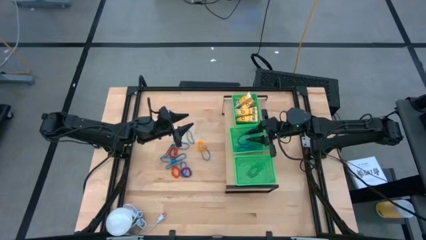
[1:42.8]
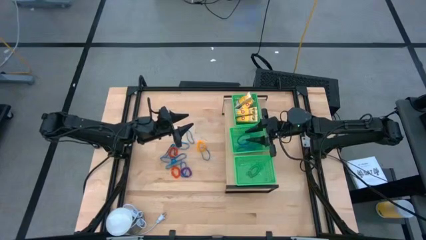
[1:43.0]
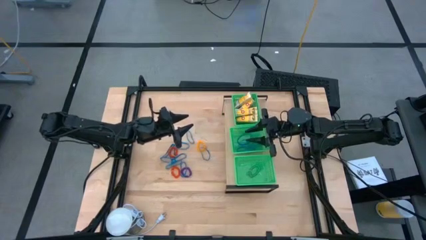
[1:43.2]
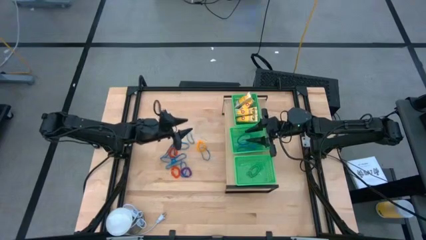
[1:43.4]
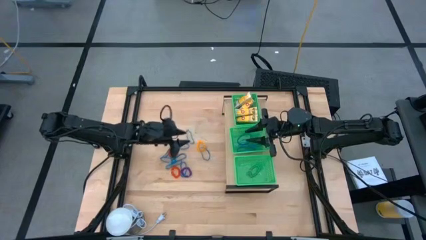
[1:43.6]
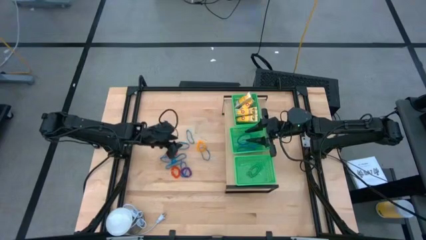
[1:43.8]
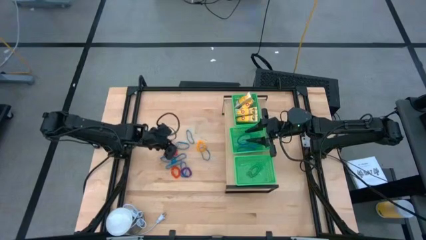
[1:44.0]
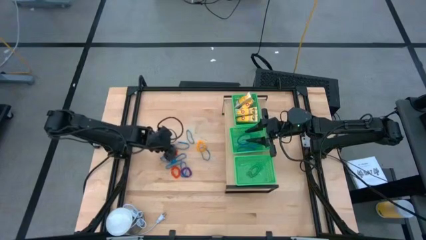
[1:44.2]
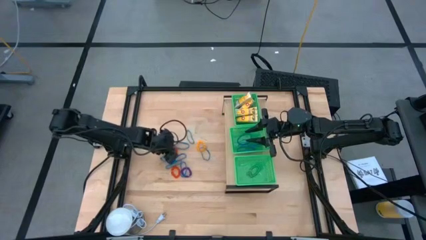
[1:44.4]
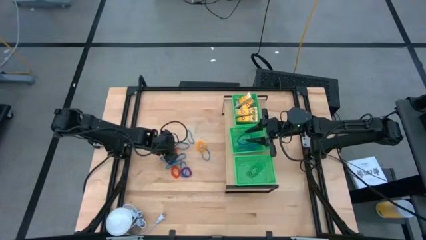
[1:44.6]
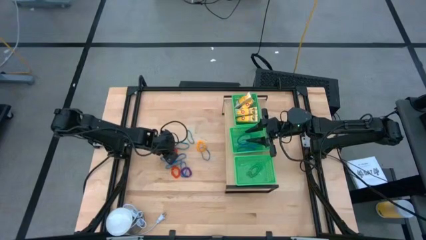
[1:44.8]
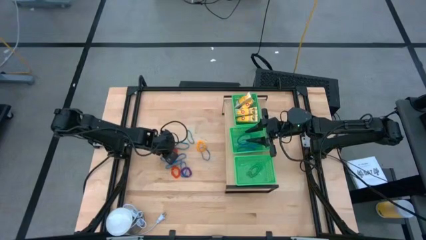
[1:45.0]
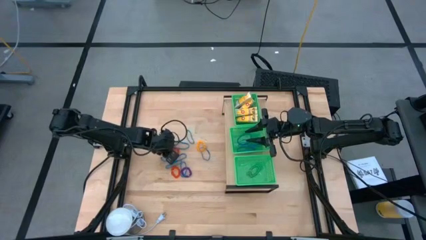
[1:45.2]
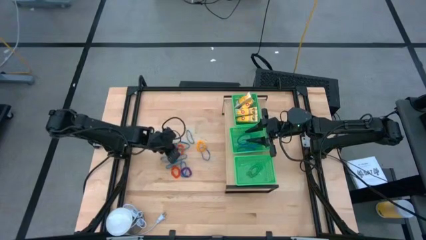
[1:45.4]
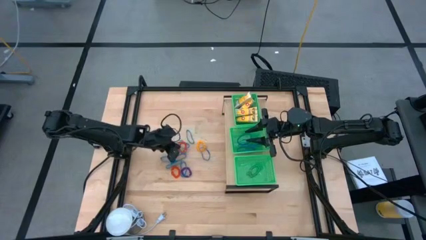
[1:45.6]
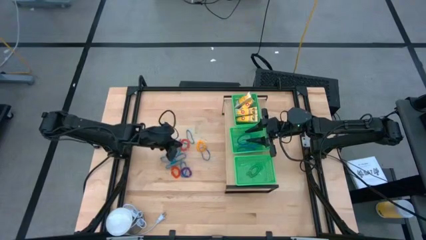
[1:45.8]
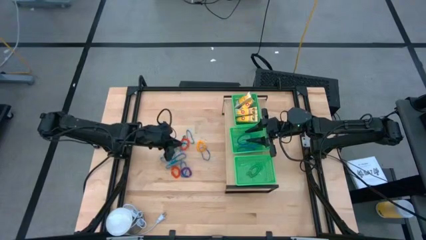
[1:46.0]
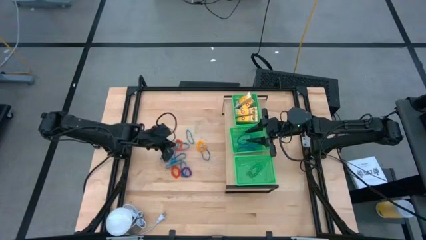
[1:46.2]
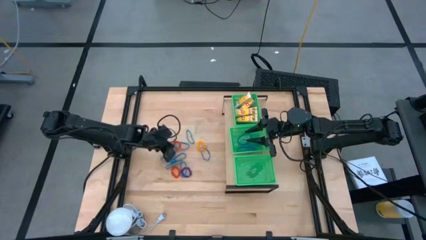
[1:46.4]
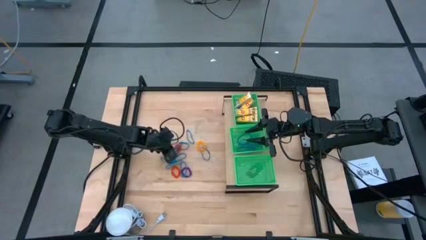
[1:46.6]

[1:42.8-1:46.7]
Task: Pick & Place Office Desk Supplies
Put the blue rubber band into the middle green bin

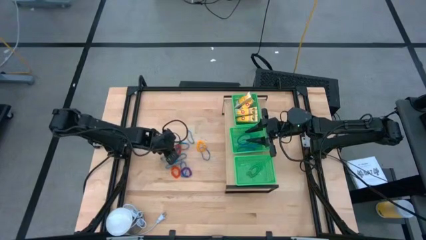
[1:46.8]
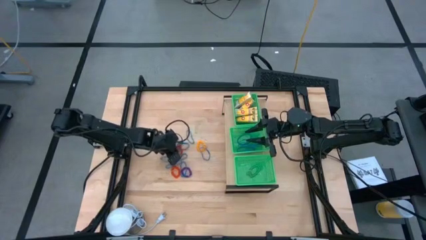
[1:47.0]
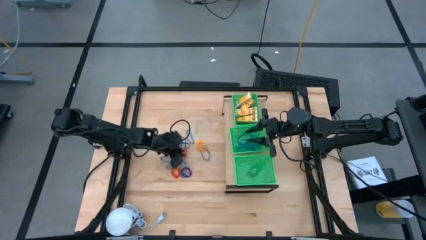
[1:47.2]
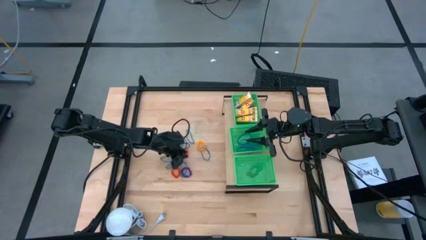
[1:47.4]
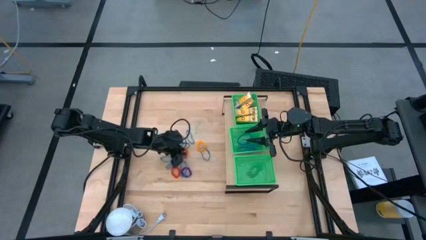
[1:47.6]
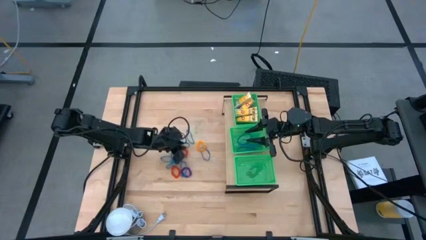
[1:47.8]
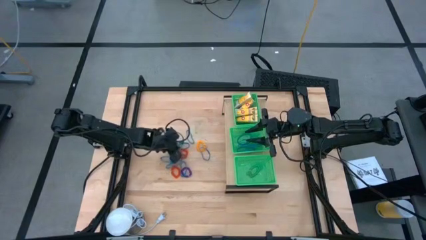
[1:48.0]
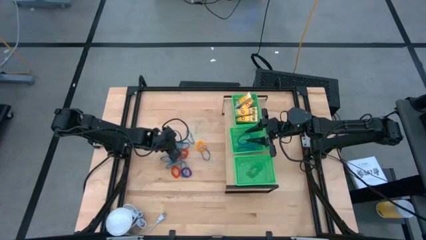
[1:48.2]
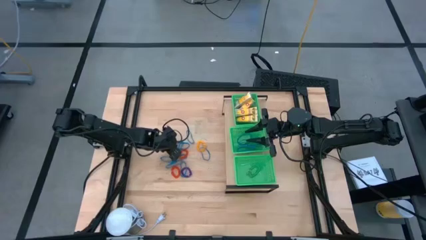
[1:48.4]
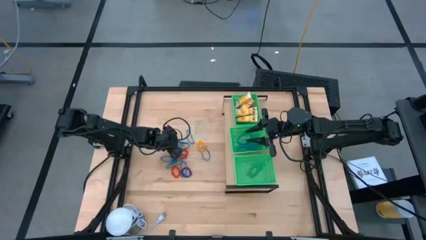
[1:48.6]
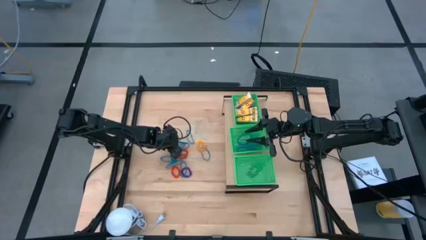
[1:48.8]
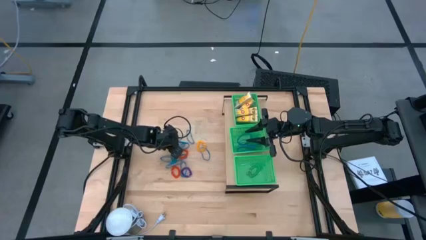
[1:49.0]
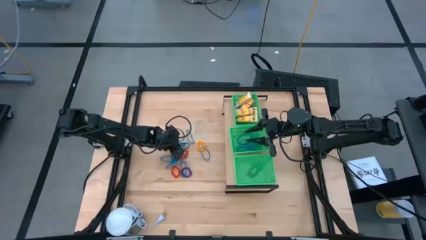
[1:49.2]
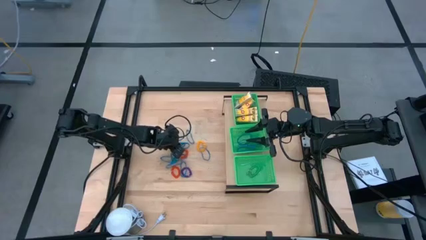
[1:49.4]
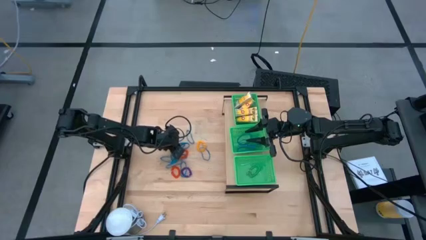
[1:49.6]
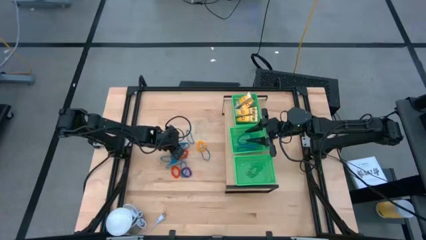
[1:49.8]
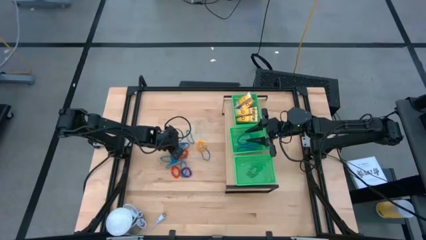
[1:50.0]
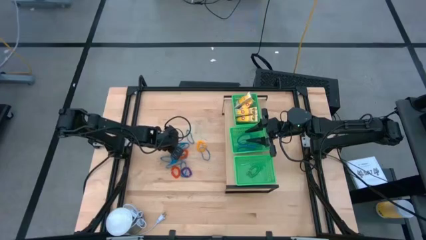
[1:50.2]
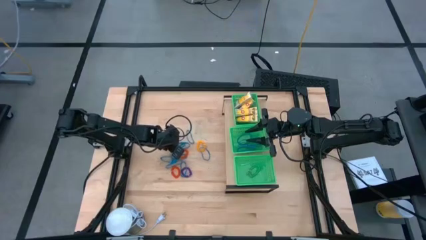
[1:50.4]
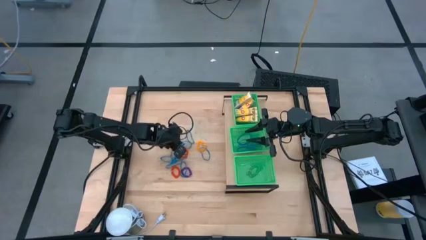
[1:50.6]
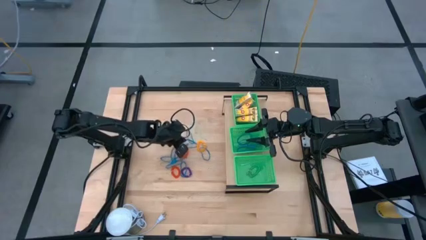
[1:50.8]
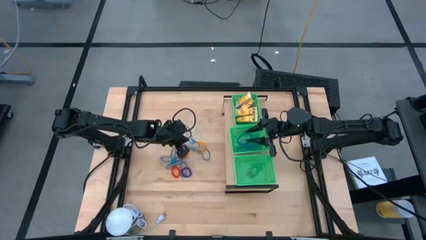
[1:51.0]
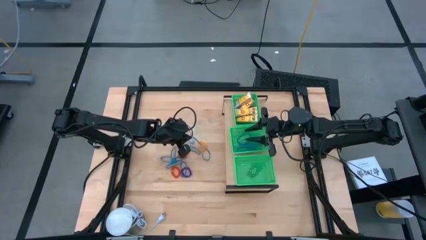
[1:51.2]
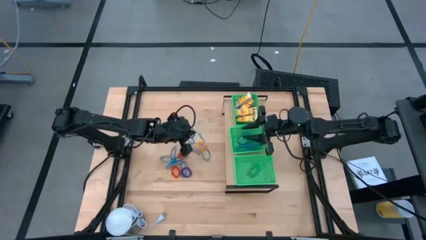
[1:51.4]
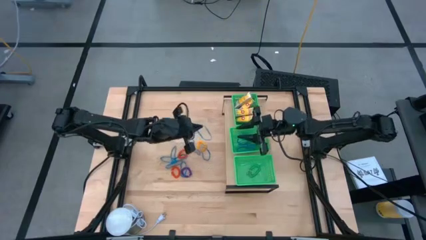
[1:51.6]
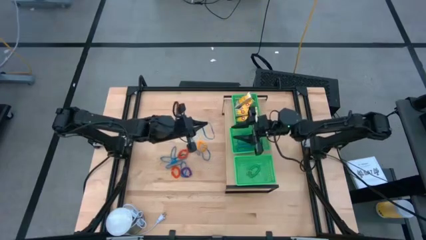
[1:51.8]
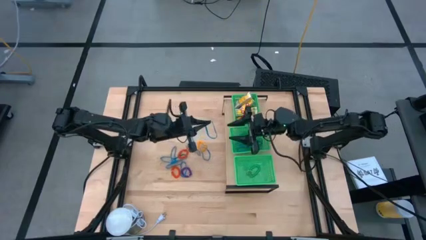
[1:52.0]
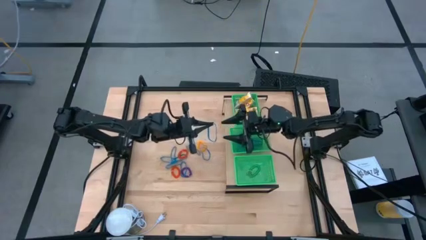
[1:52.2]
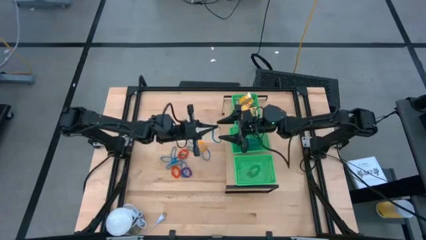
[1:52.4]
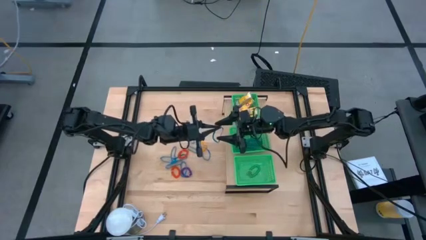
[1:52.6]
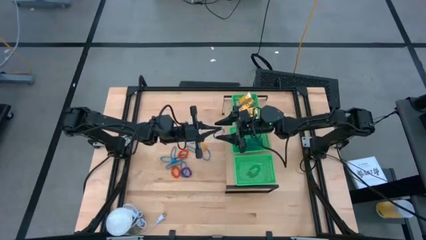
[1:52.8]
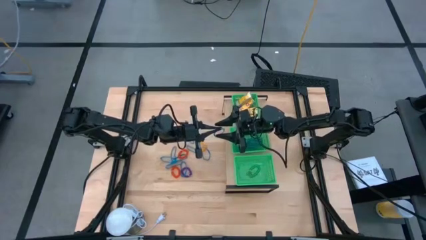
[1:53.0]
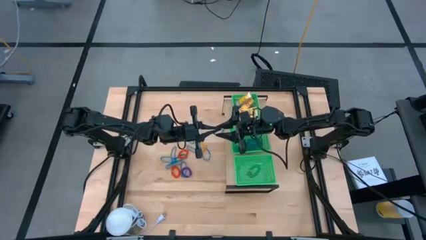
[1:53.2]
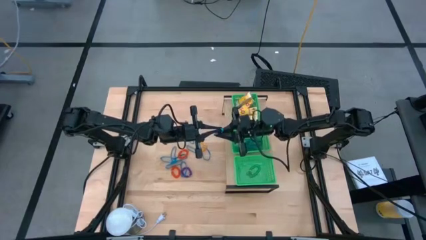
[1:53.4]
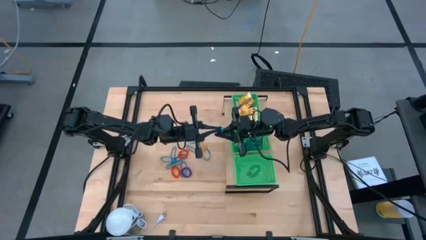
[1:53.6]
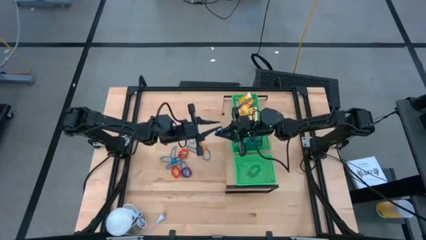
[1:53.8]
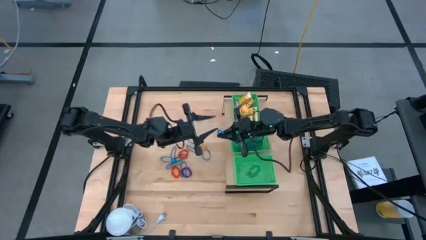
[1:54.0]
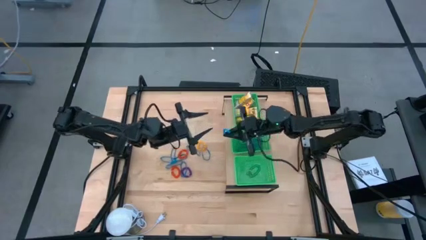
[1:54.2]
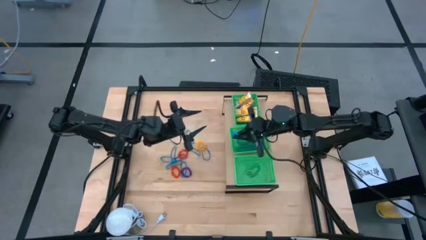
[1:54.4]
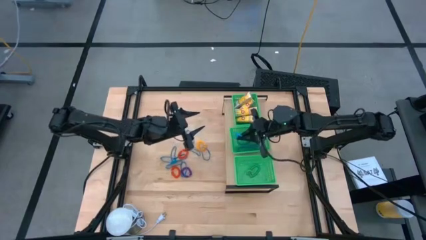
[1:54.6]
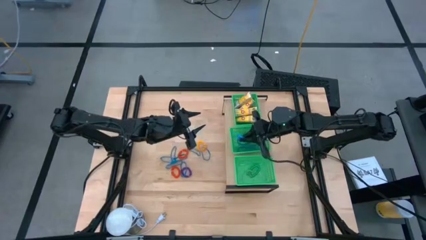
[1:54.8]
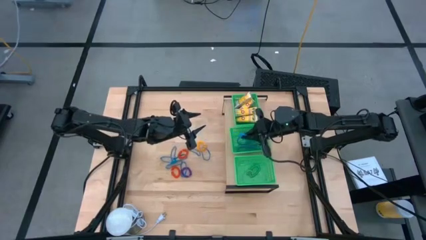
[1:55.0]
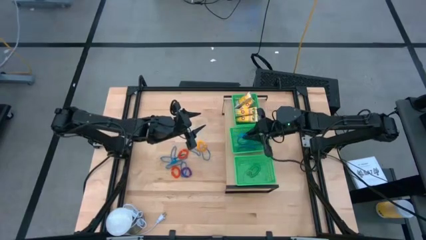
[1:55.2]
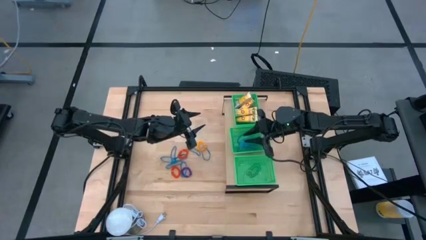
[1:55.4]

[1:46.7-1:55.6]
Put the blue rubber band into the middle green bin
